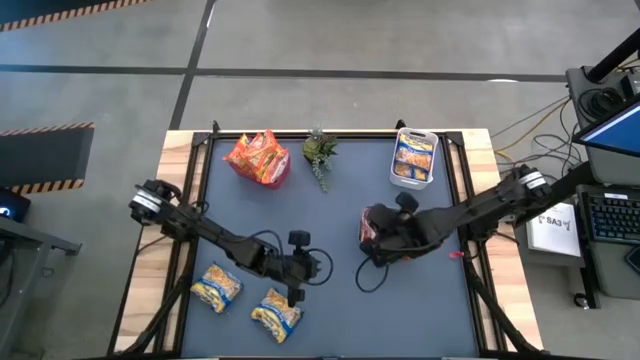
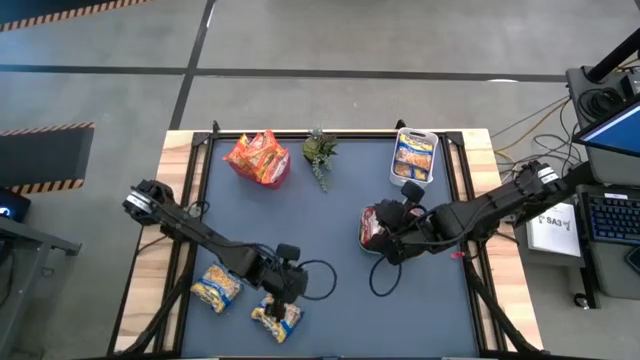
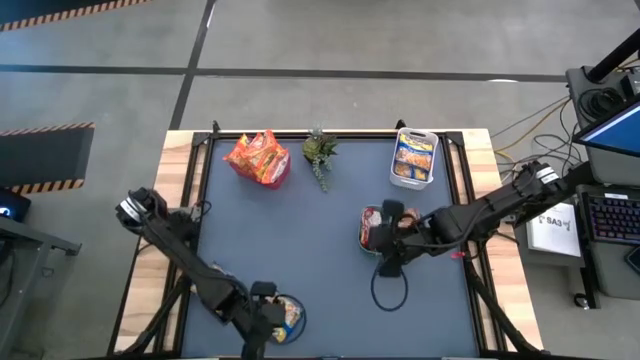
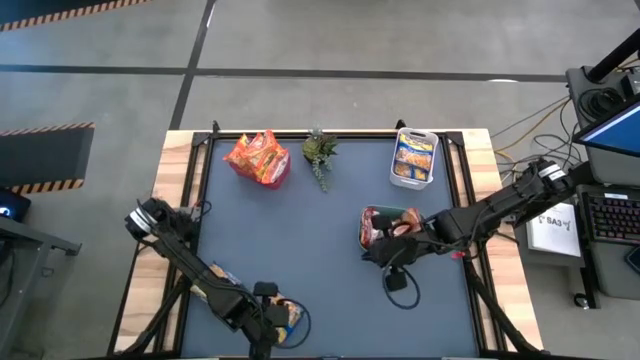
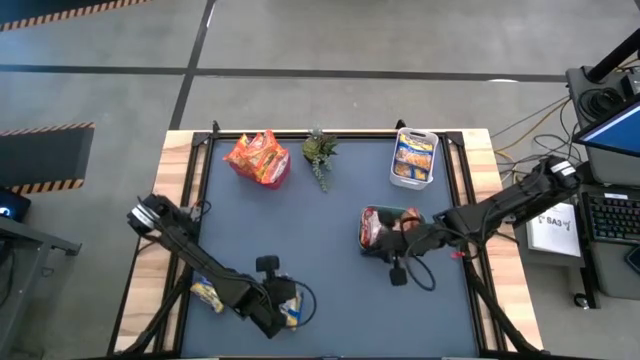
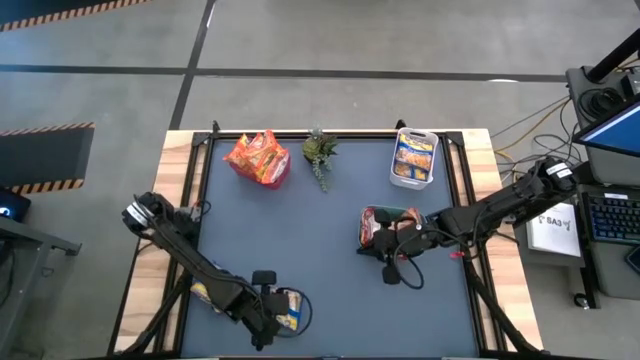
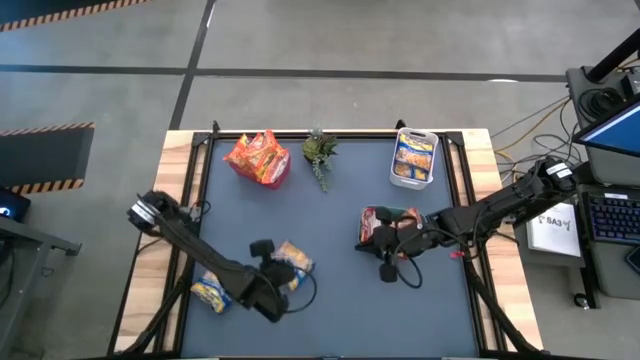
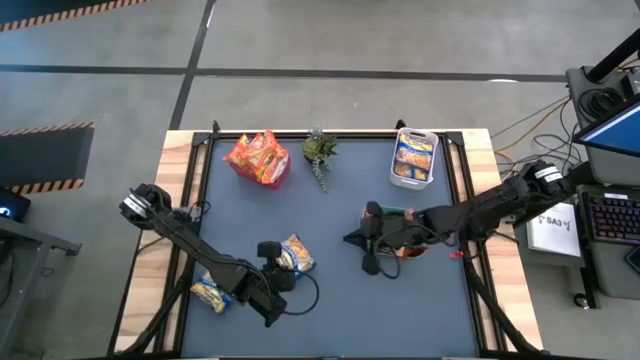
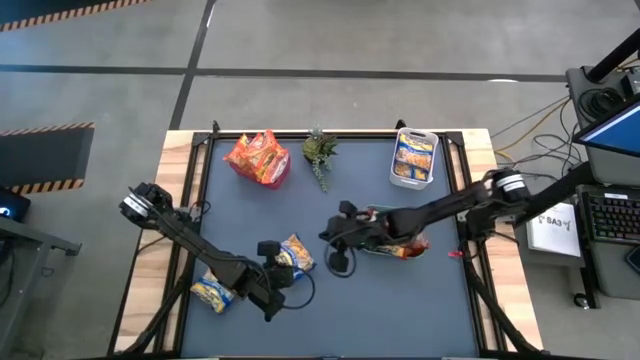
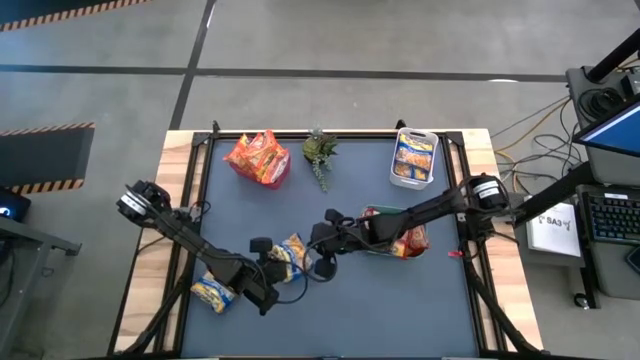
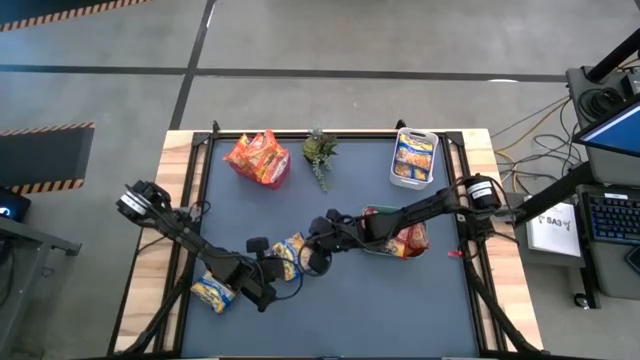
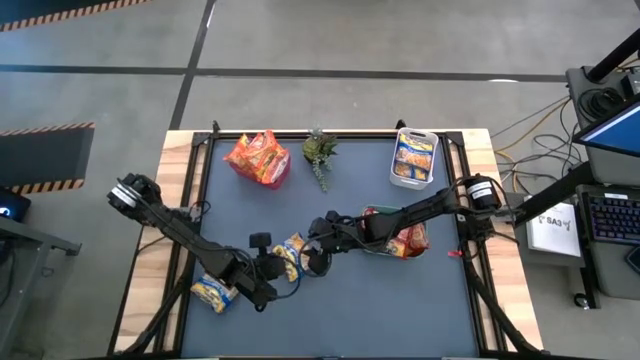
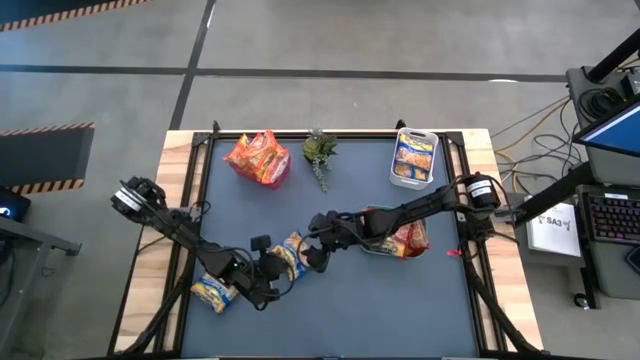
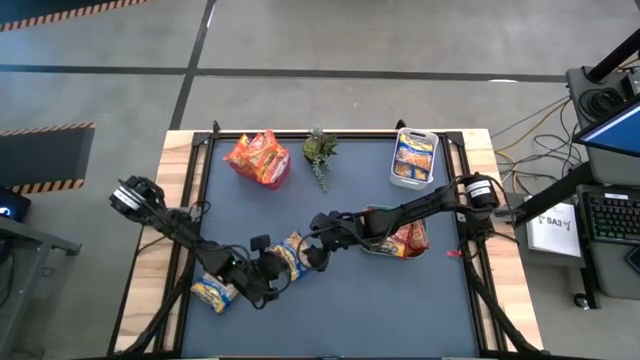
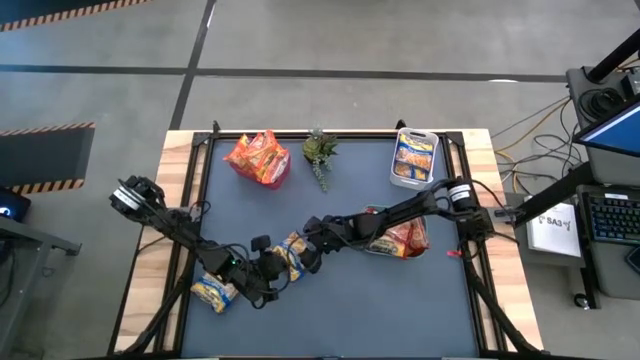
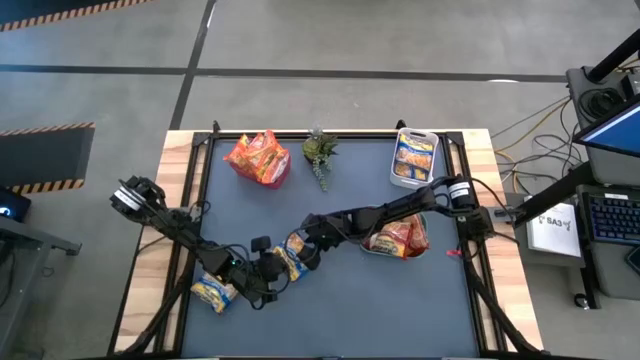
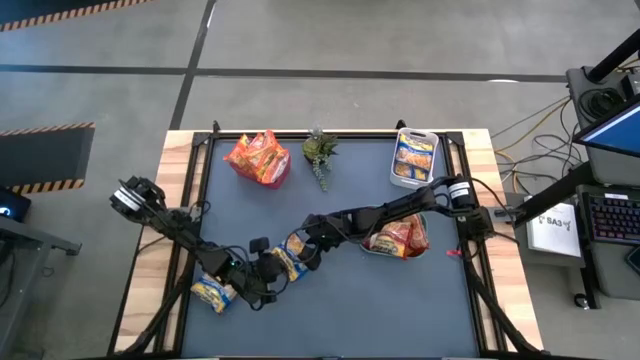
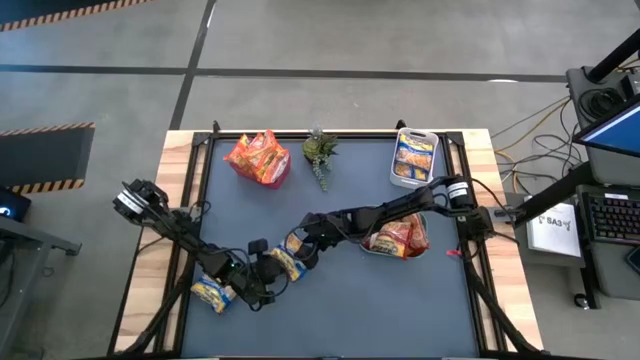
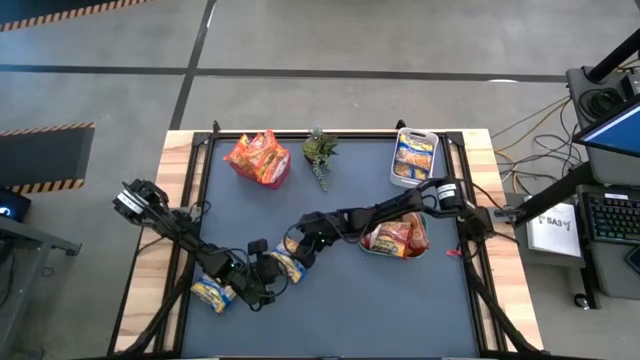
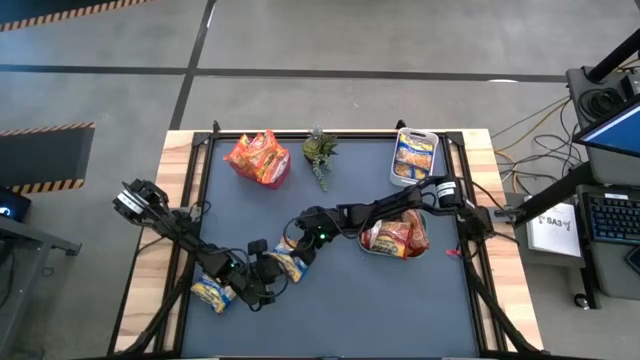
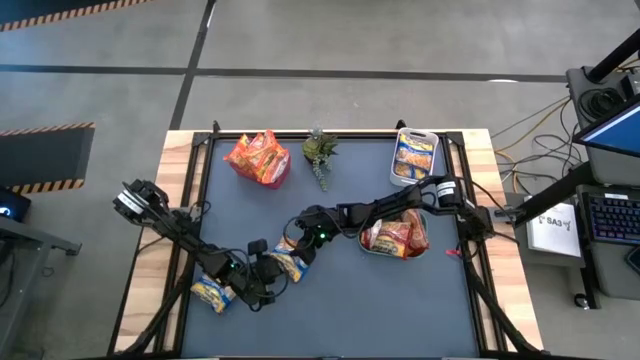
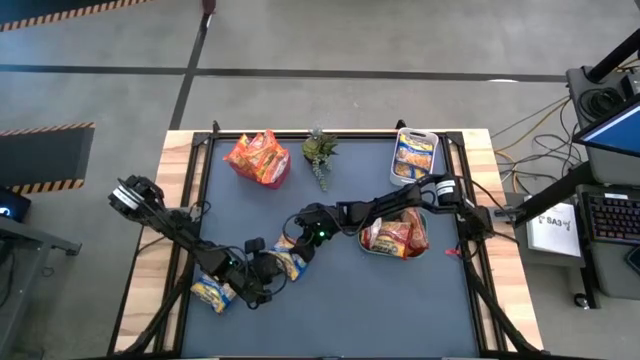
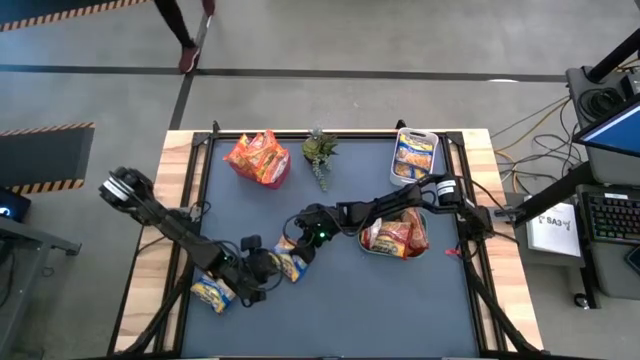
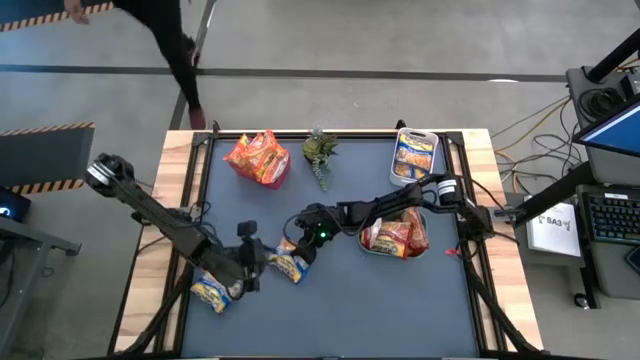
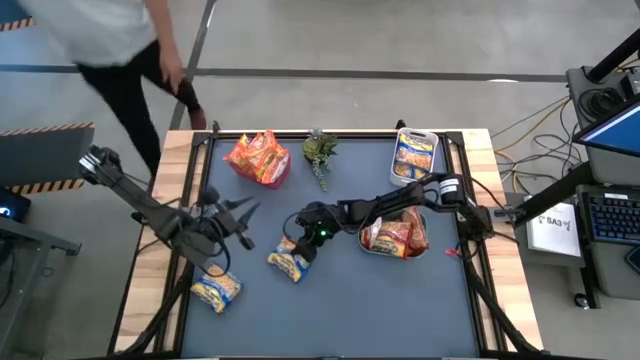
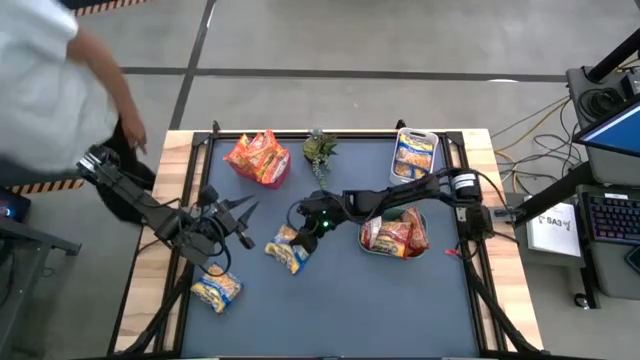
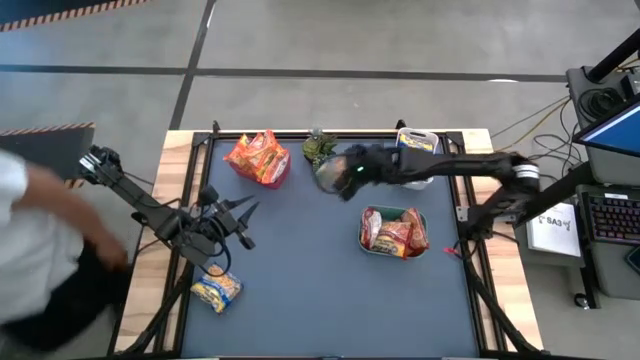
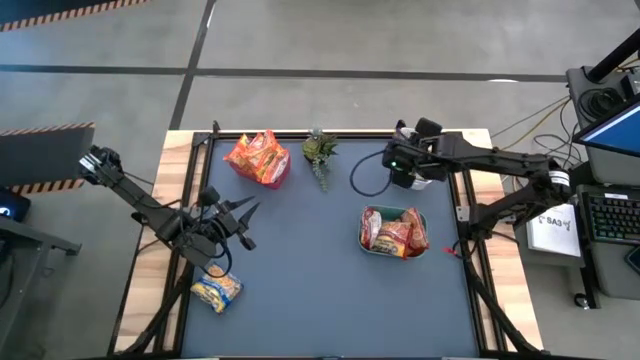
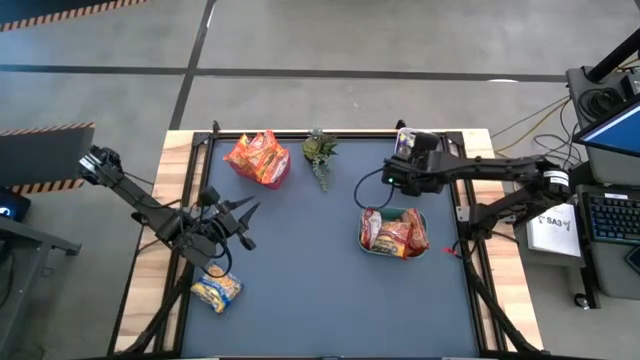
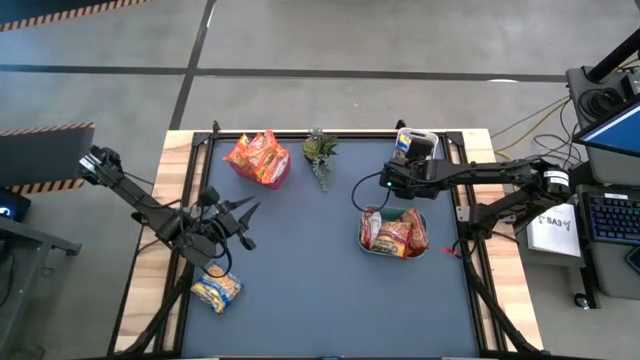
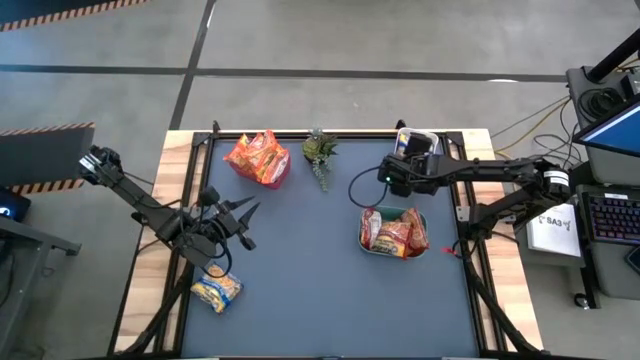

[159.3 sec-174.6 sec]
Task: Sort Maruchan noodles
Put the blue noodle pack into the white bin

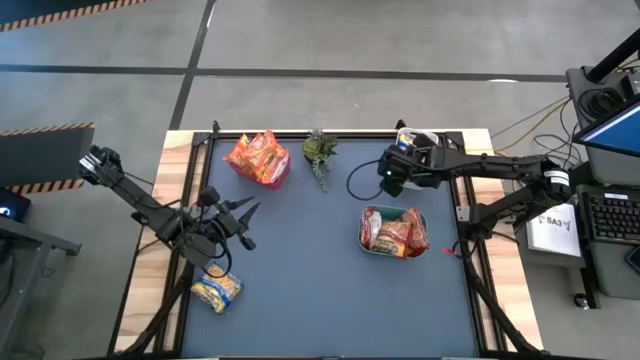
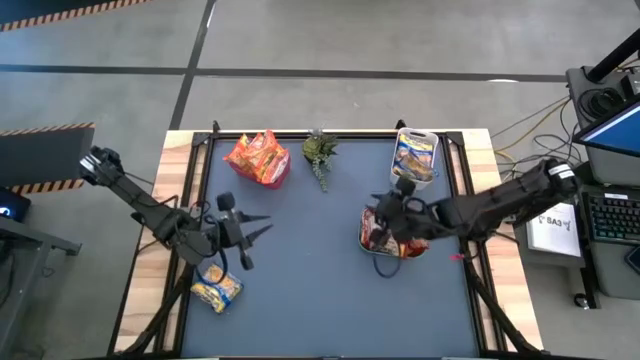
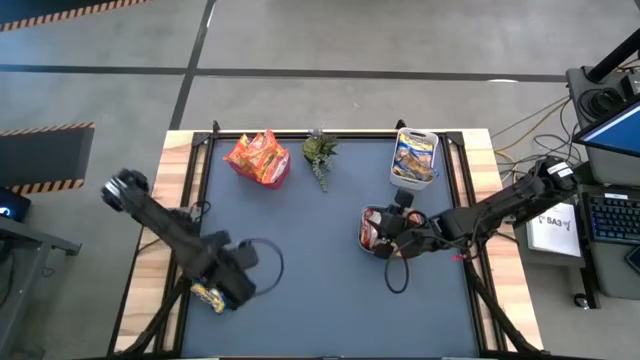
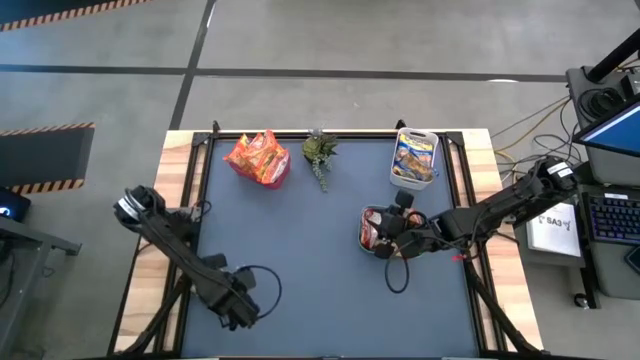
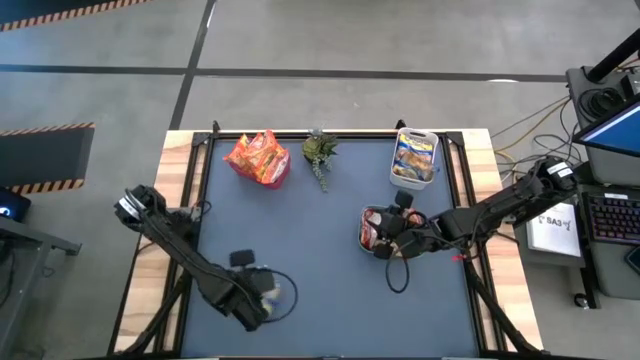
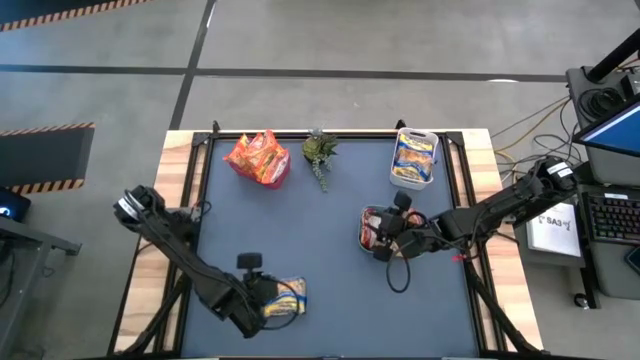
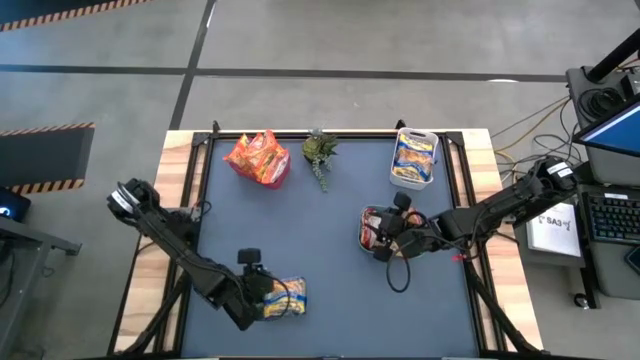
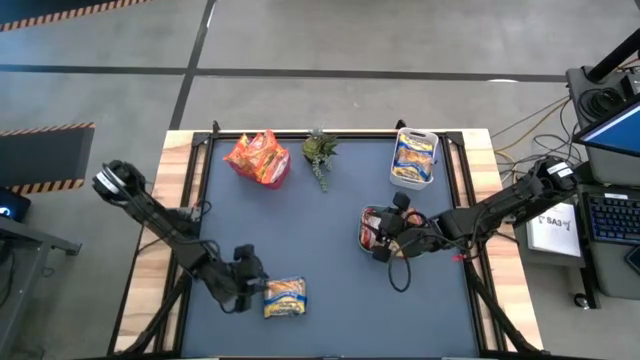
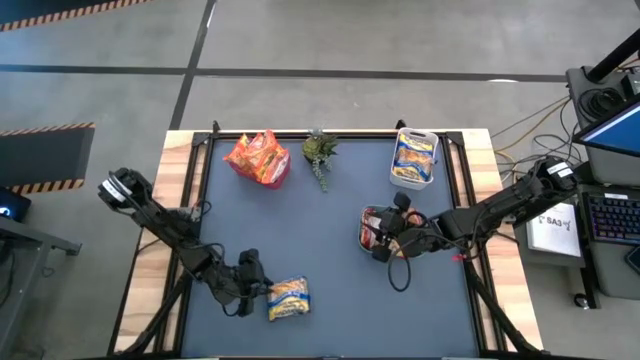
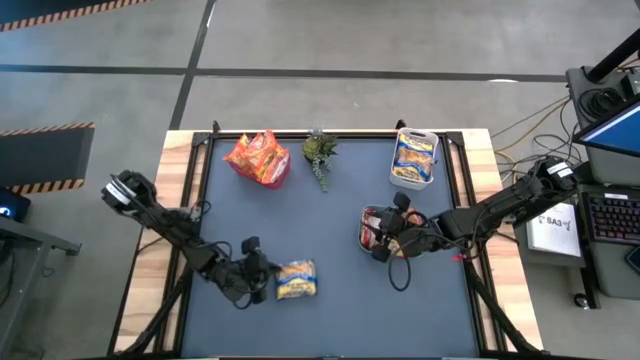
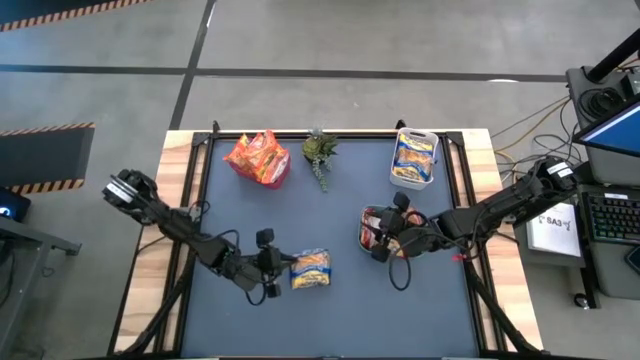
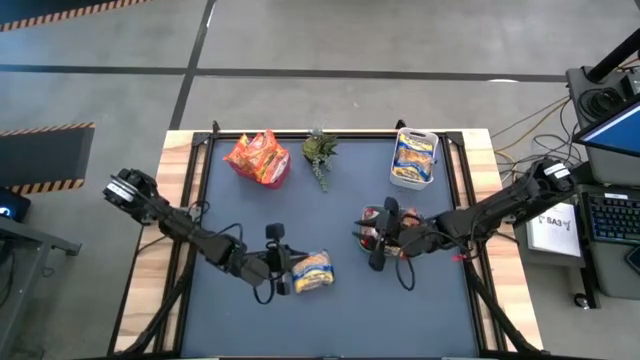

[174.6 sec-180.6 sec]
Put the blue noodle pack into the white bin
